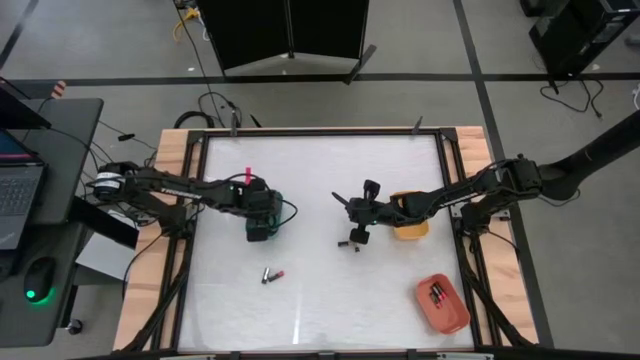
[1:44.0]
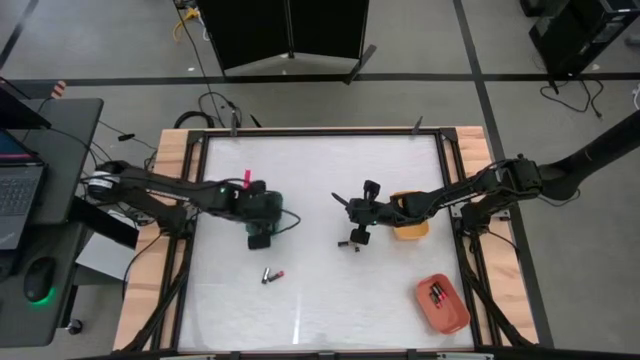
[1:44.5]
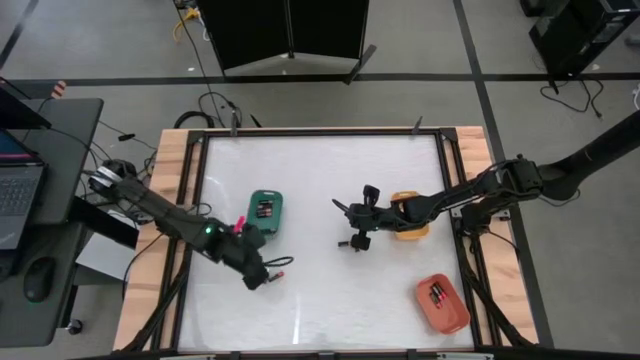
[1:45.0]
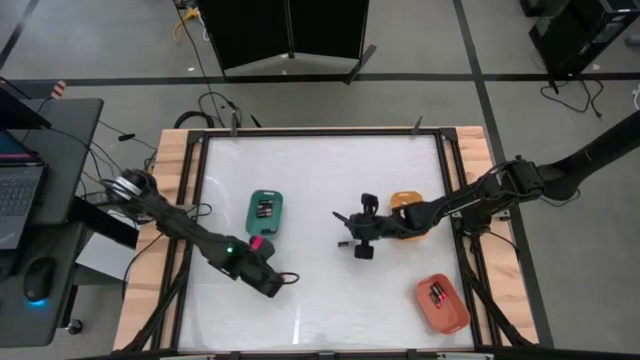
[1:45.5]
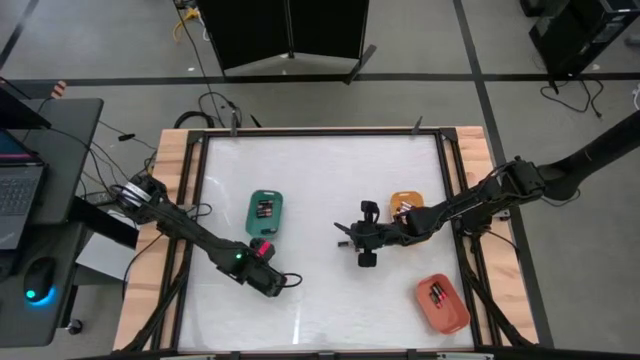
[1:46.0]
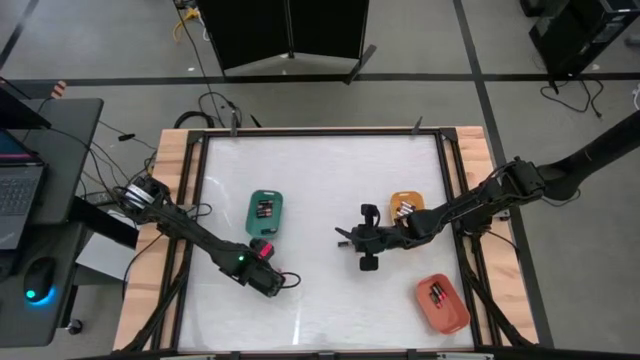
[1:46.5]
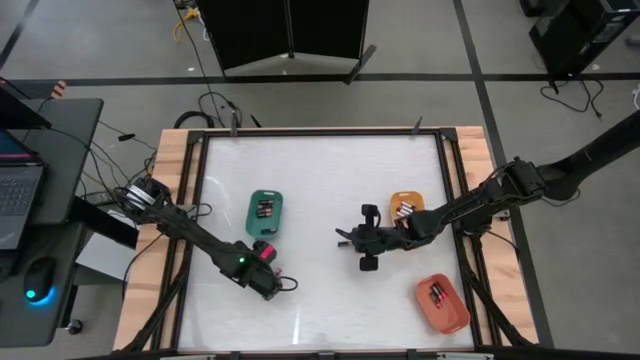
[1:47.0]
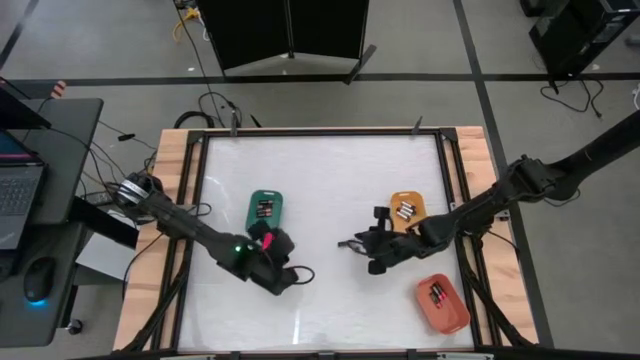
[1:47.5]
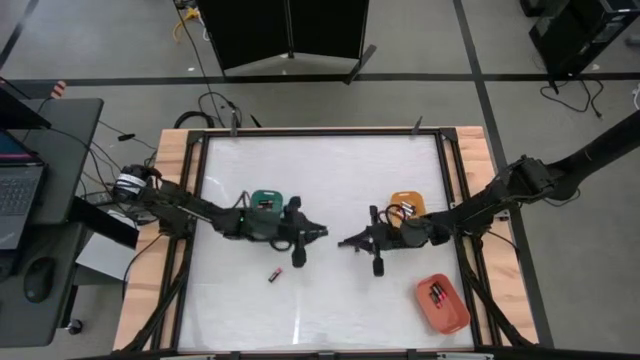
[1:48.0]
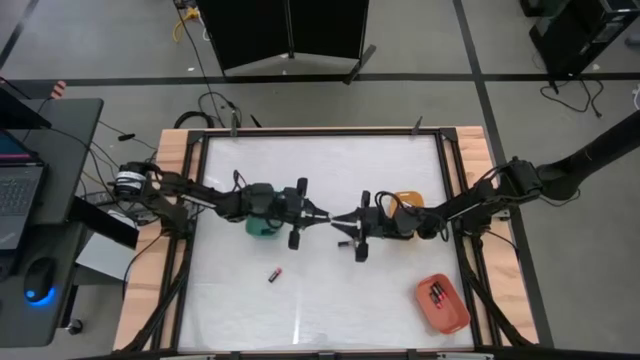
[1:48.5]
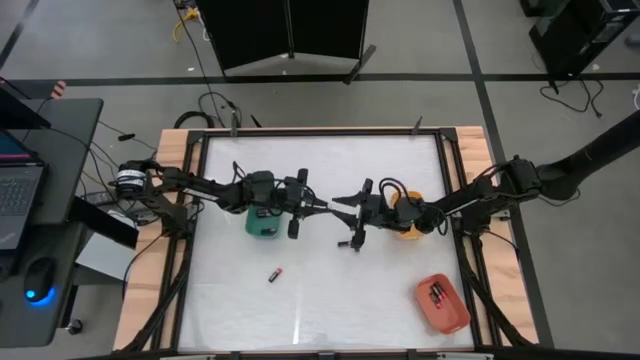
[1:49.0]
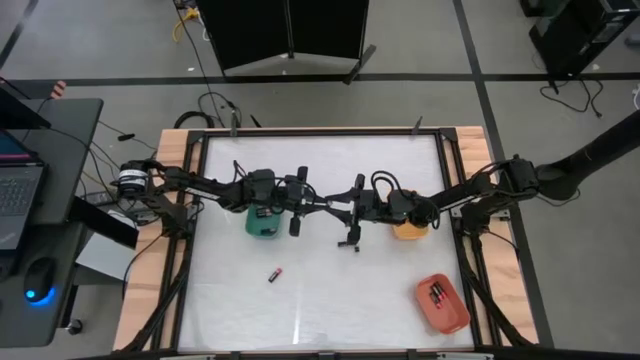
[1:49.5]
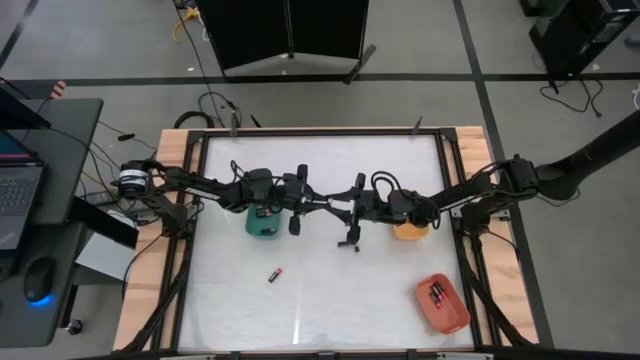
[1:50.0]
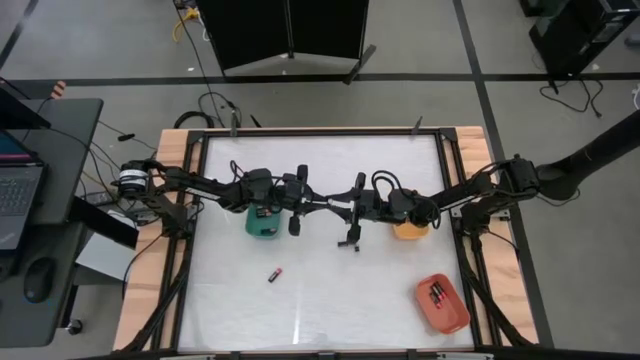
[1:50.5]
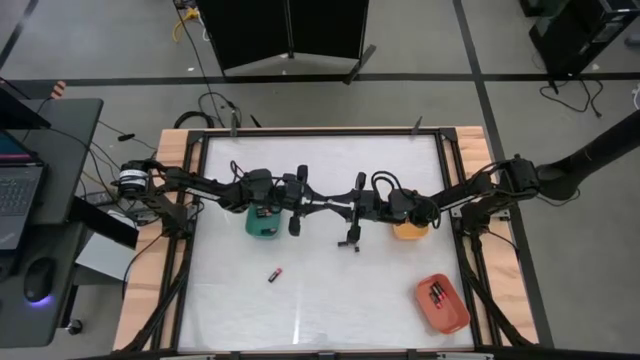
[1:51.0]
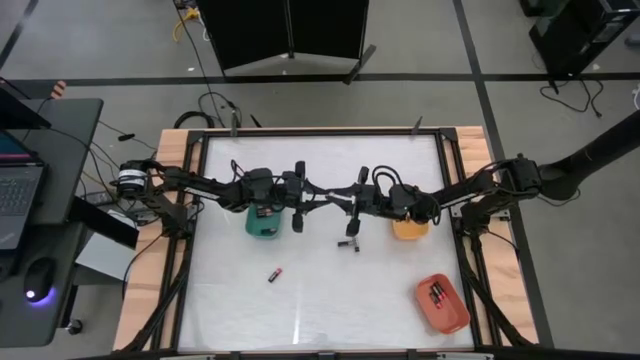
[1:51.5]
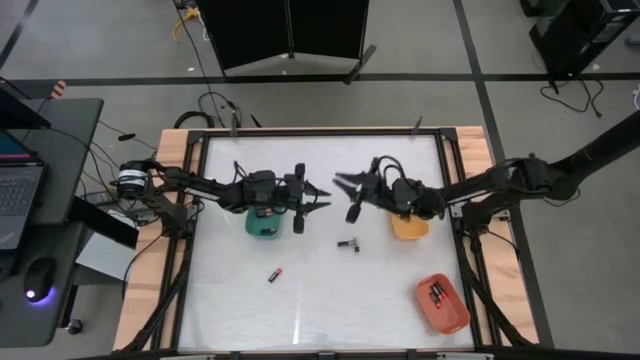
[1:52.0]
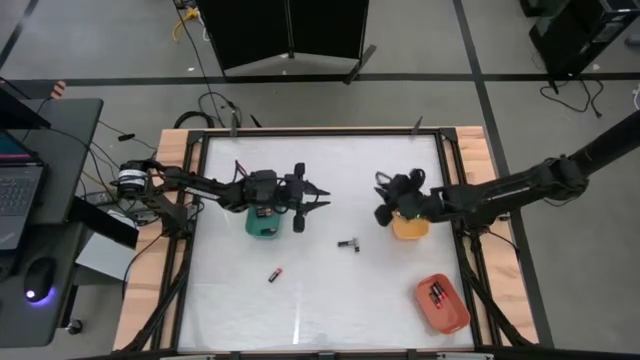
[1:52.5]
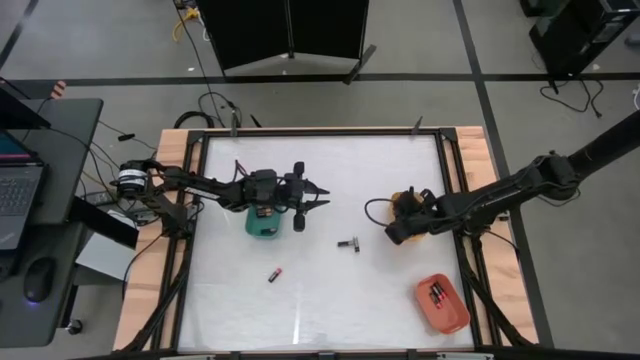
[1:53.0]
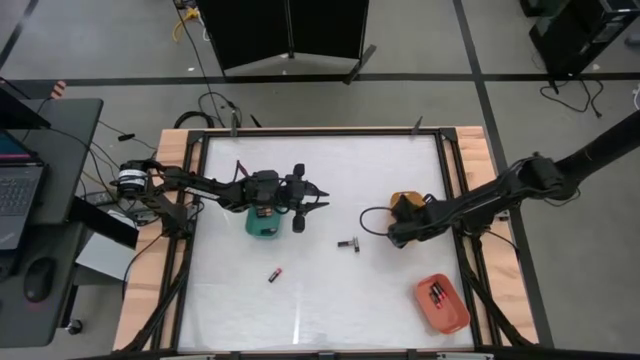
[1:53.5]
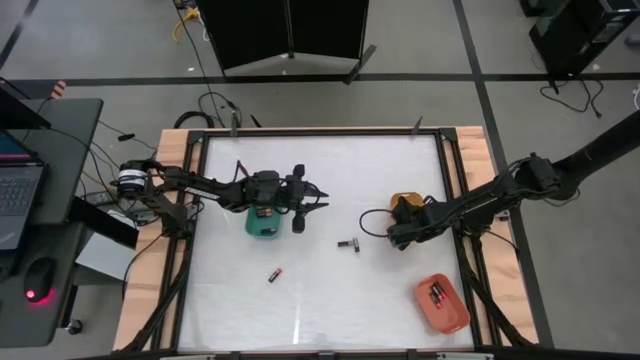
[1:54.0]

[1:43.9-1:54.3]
Task: Sort batteries
Put the silver battery into the yellow bin

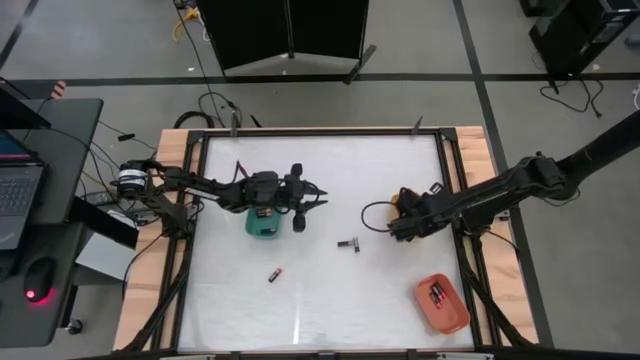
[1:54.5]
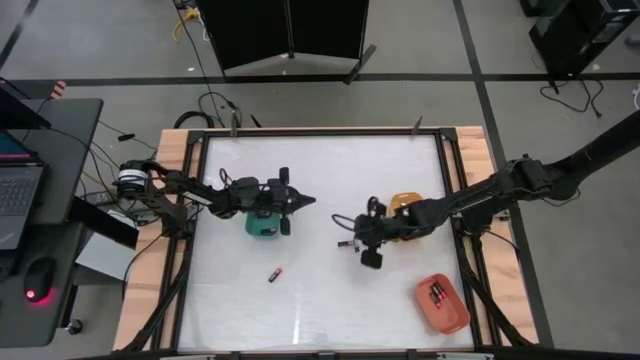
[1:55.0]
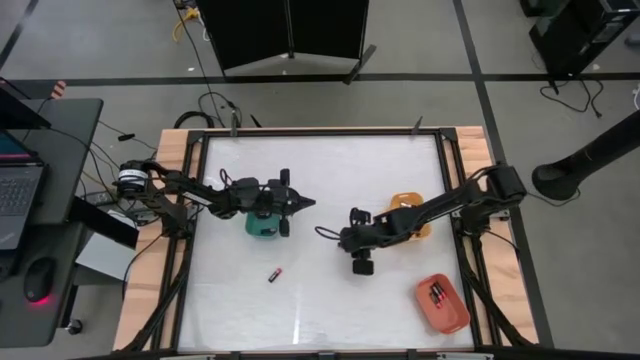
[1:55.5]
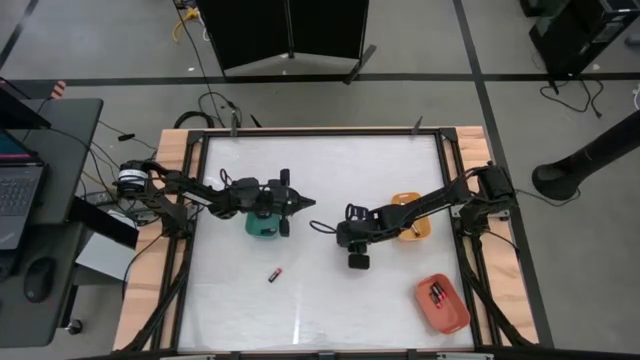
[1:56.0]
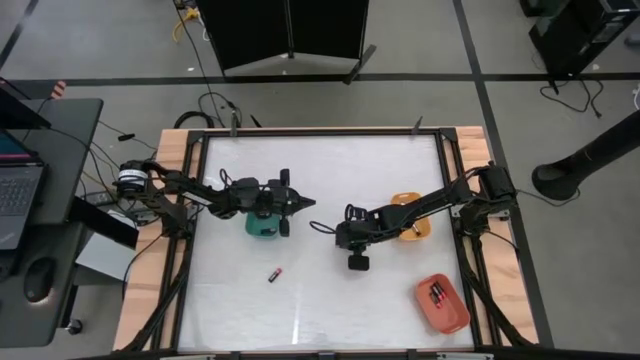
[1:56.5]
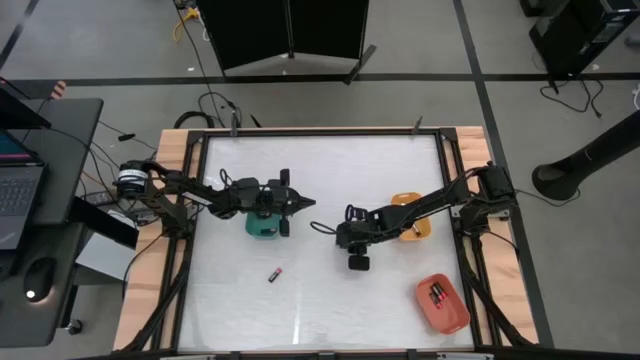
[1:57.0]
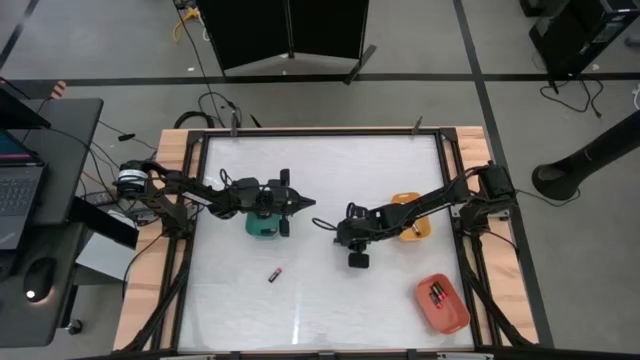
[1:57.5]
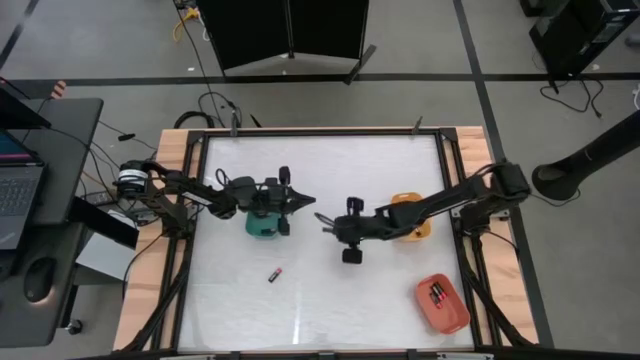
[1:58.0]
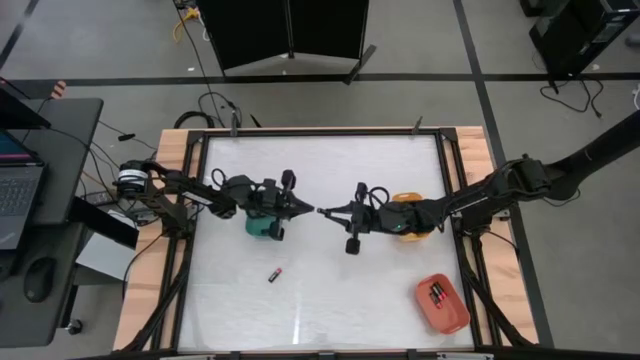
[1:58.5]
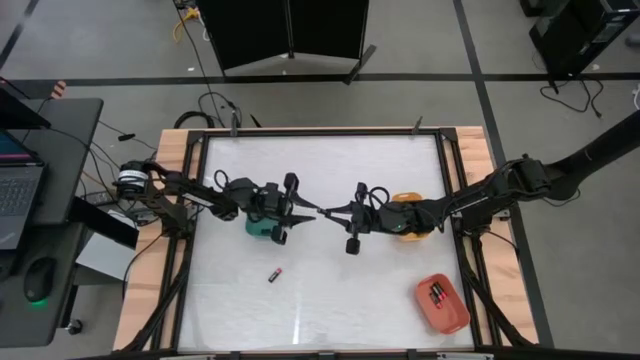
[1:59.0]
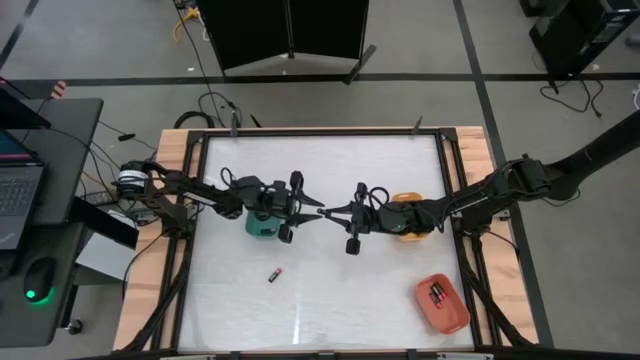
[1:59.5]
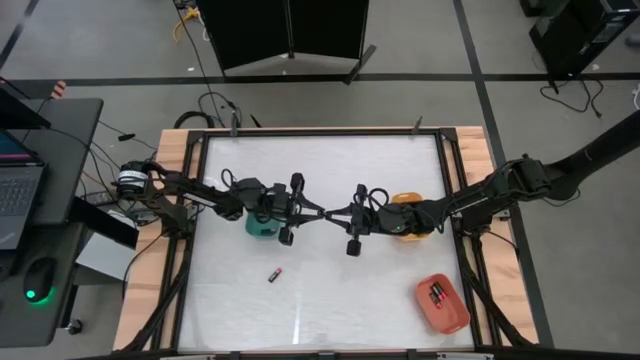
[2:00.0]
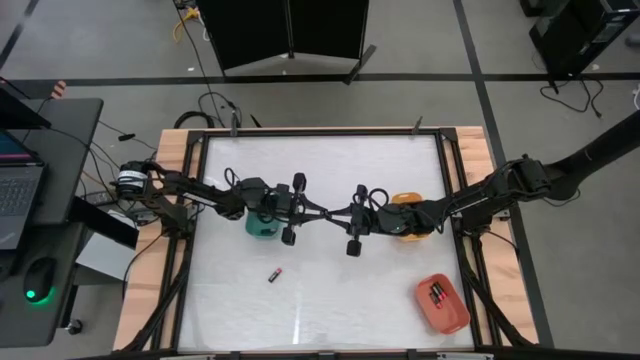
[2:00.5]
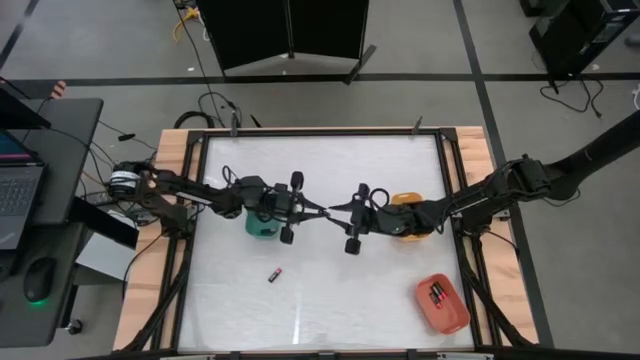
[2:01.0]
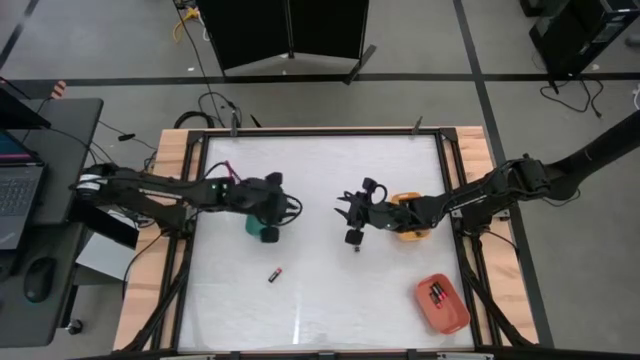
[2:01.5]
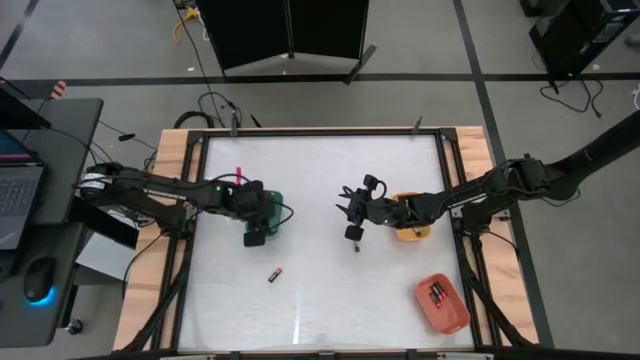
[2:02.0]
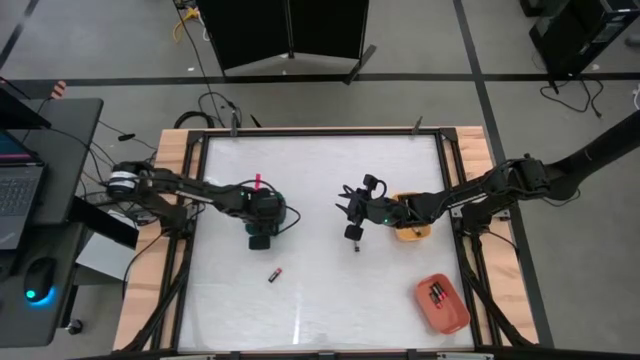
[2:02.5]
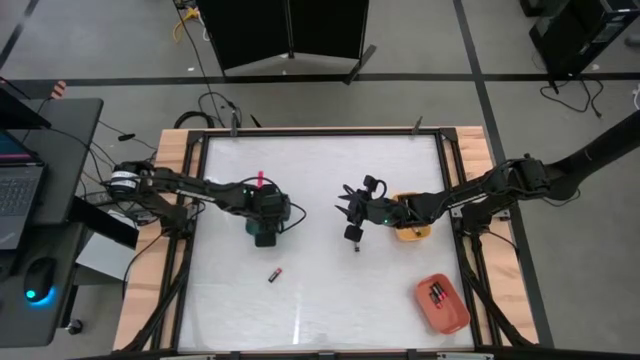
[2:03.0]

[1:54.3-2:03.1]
Put the black and copper battery into the green bin

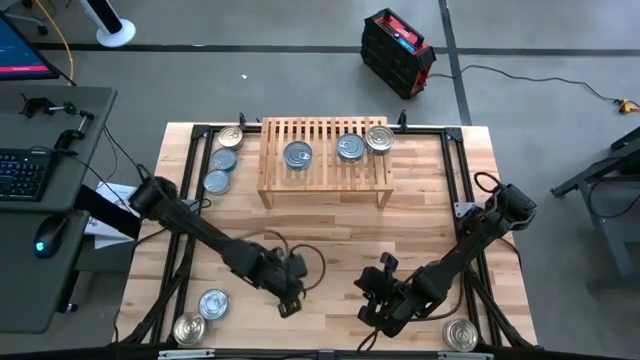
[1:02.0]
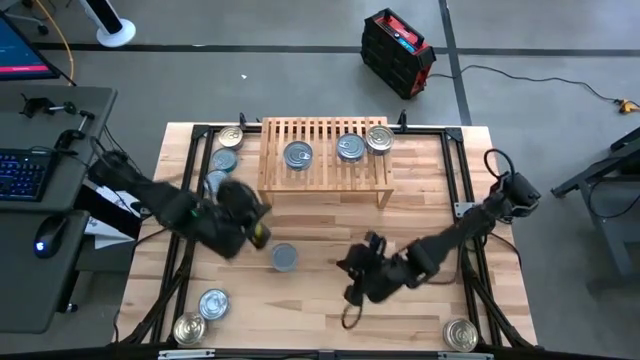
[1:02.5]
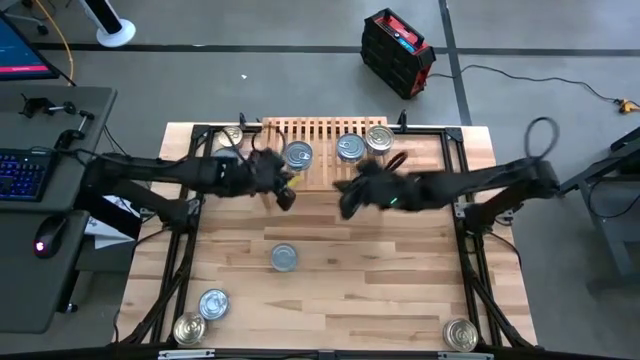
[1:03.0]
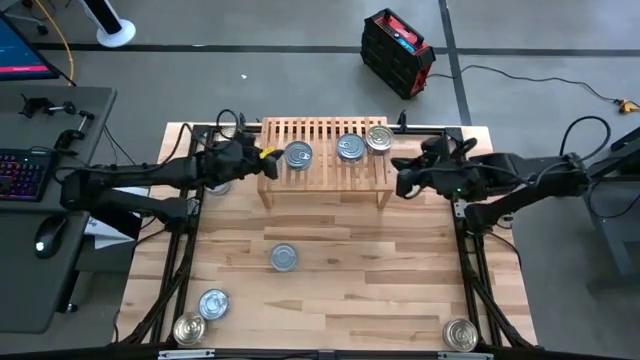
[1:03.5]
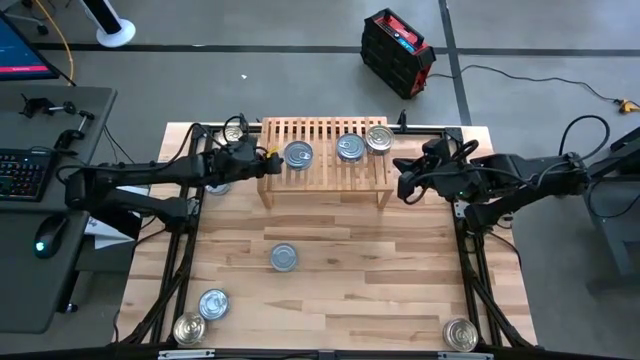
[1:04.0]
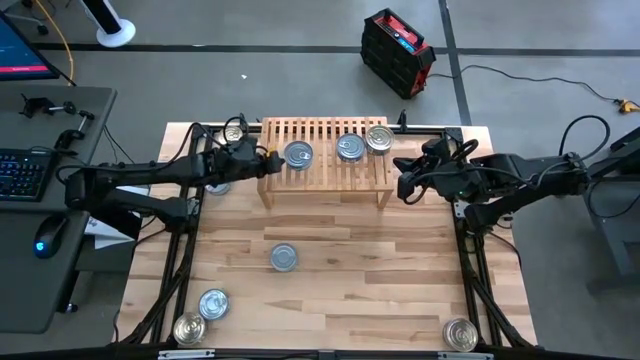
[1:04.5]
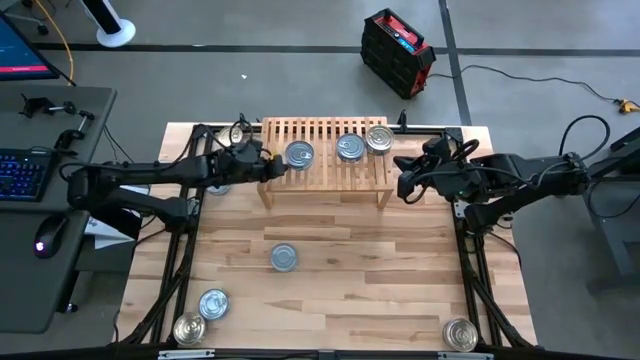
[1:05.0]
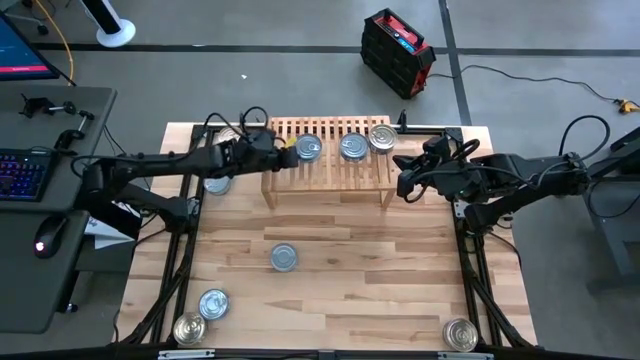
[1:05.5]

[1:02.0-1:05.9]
Task: Stack canned seafood by type on shelf
Adjust the green tuna can on the shelf
